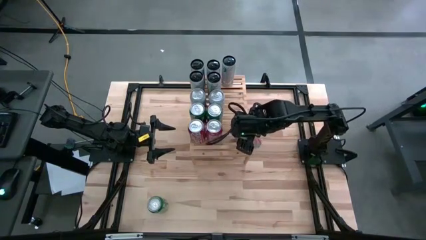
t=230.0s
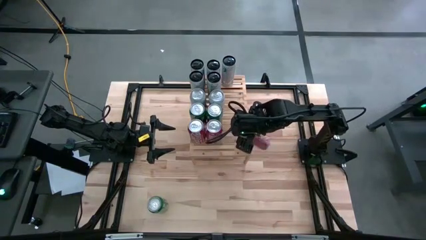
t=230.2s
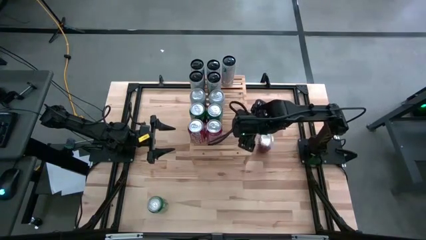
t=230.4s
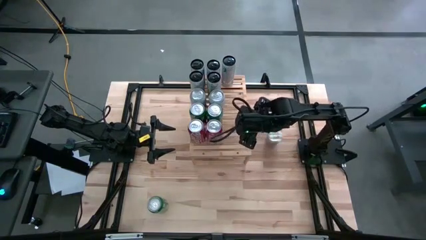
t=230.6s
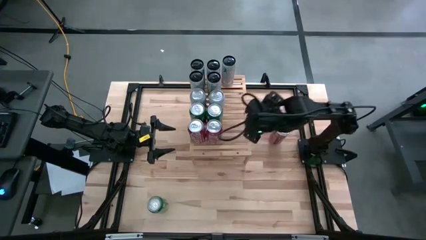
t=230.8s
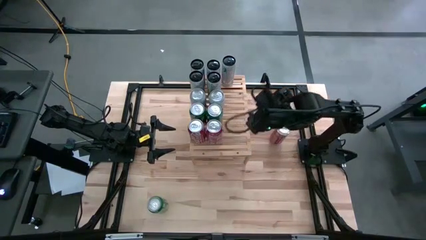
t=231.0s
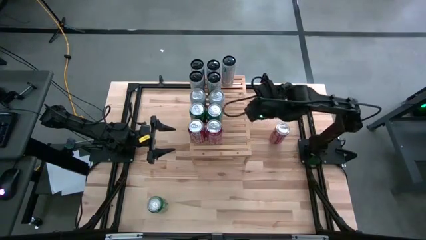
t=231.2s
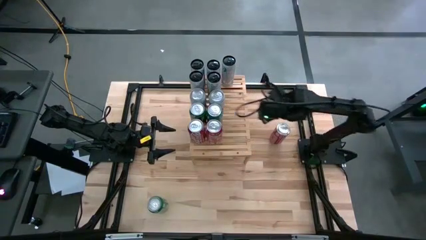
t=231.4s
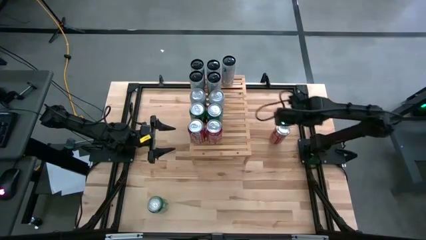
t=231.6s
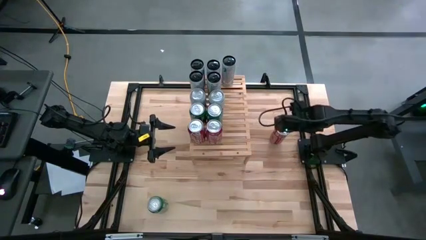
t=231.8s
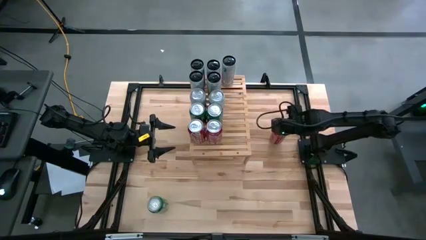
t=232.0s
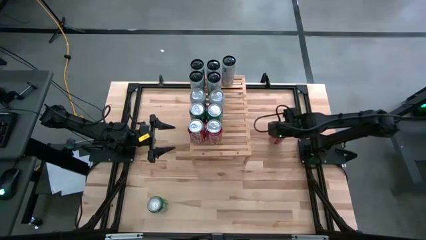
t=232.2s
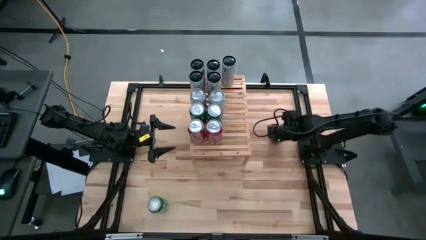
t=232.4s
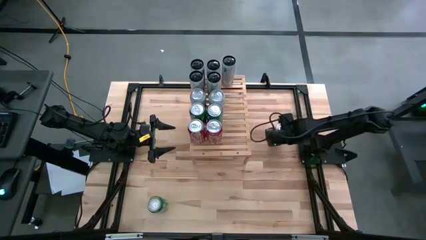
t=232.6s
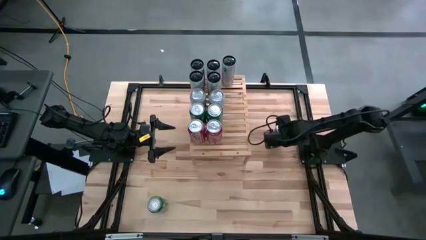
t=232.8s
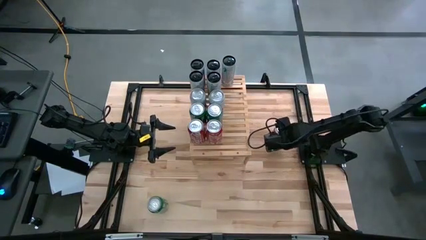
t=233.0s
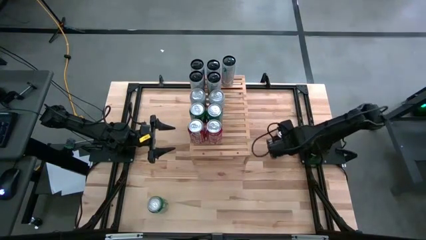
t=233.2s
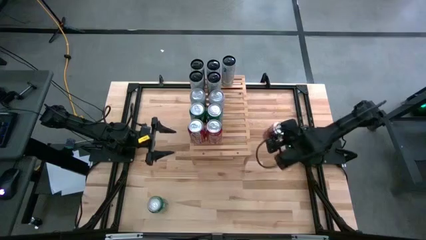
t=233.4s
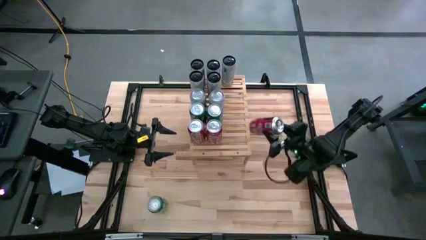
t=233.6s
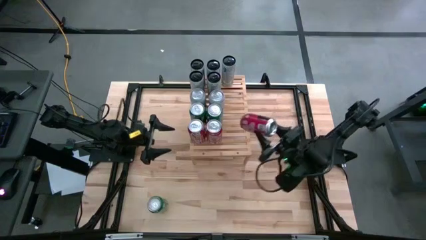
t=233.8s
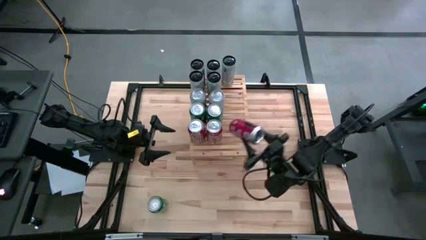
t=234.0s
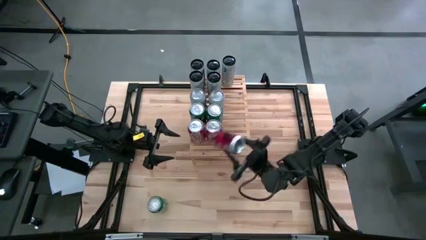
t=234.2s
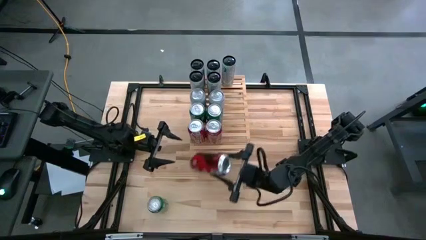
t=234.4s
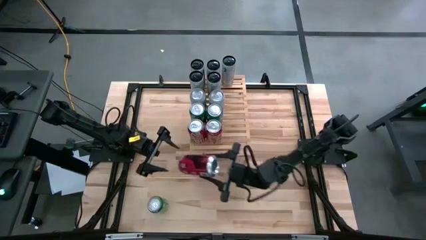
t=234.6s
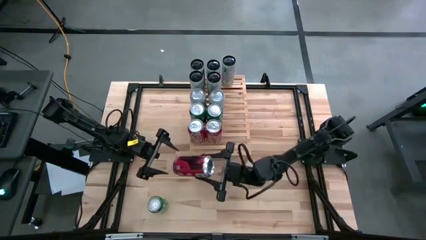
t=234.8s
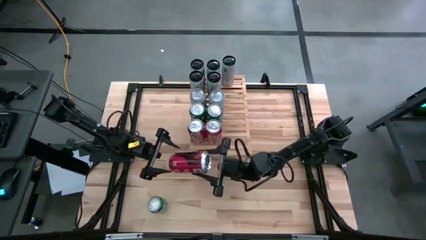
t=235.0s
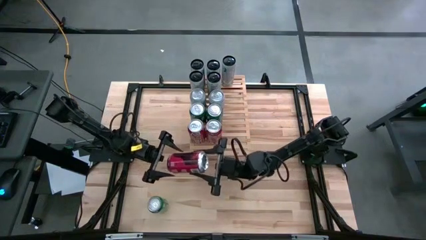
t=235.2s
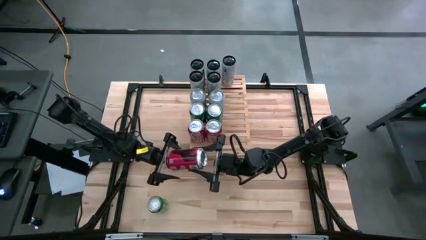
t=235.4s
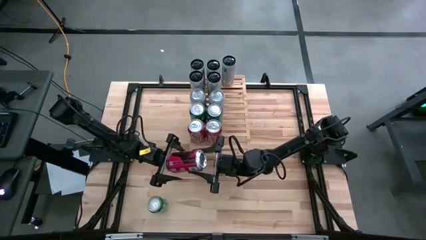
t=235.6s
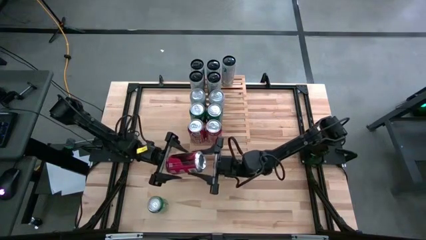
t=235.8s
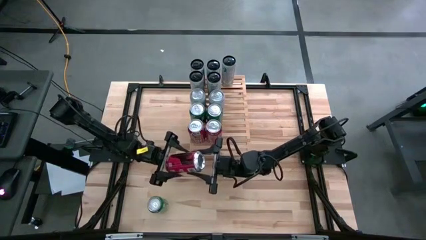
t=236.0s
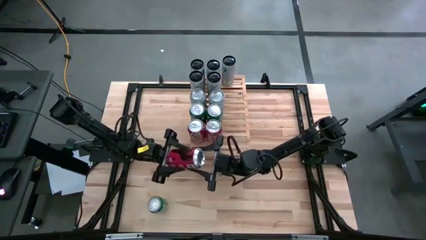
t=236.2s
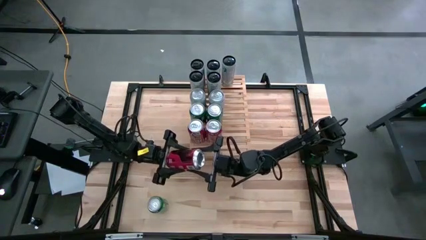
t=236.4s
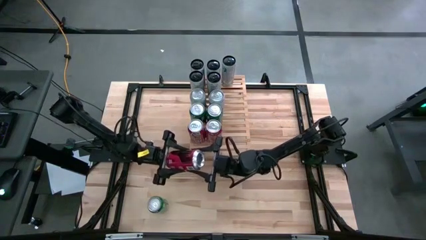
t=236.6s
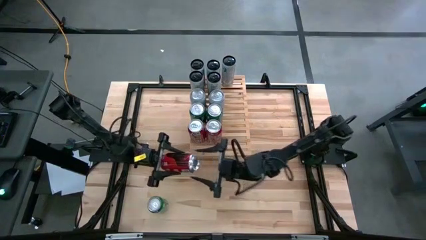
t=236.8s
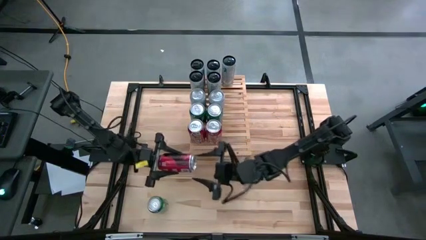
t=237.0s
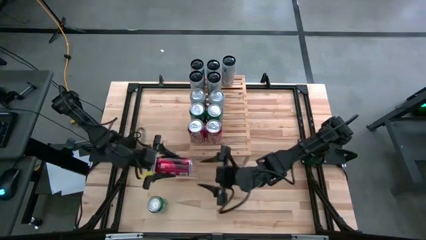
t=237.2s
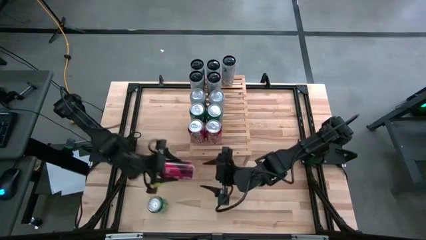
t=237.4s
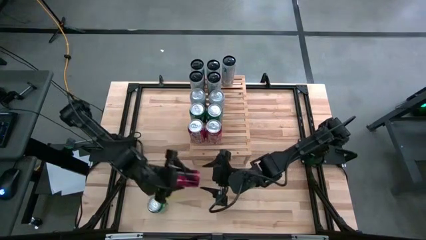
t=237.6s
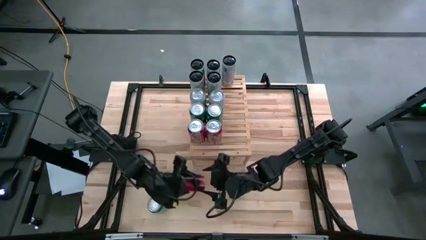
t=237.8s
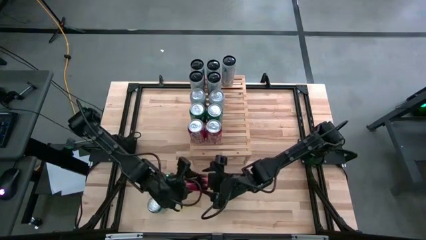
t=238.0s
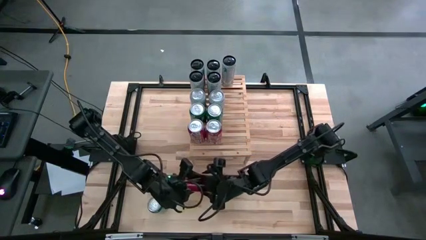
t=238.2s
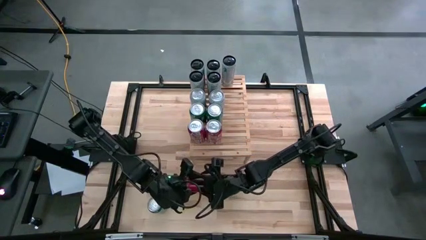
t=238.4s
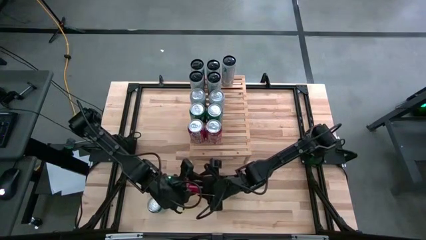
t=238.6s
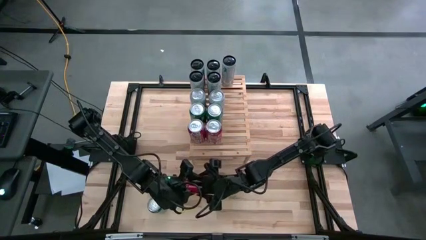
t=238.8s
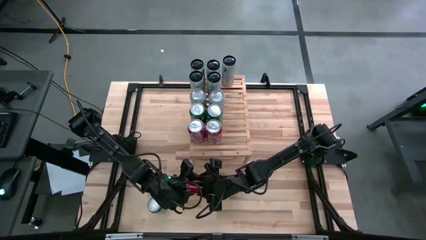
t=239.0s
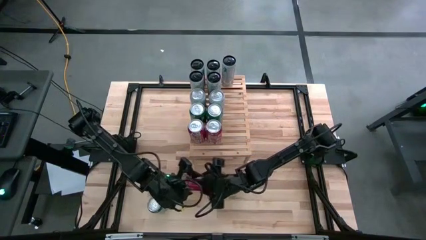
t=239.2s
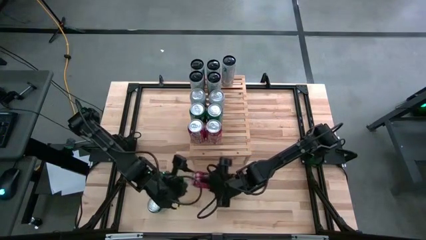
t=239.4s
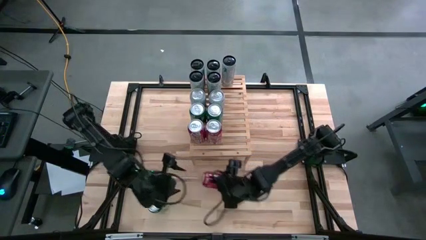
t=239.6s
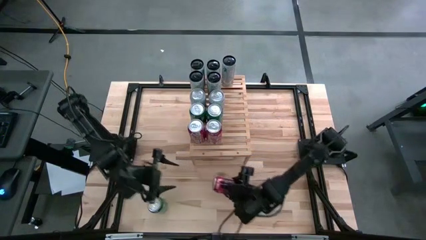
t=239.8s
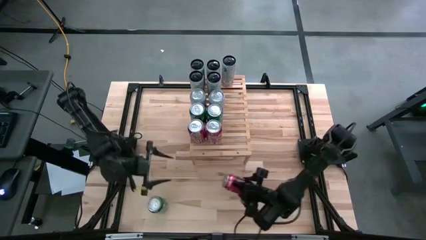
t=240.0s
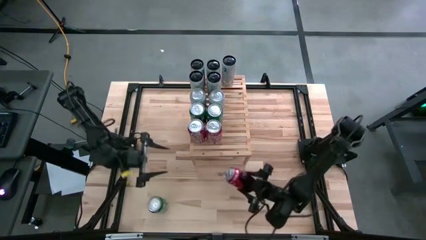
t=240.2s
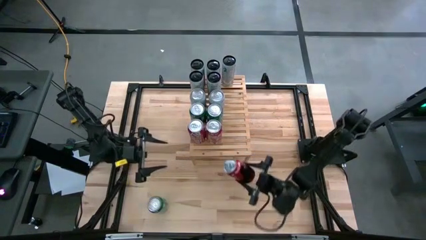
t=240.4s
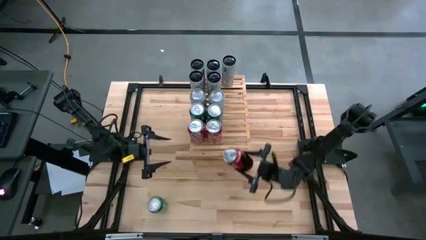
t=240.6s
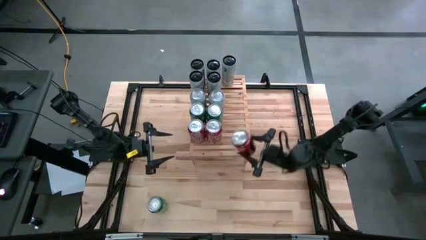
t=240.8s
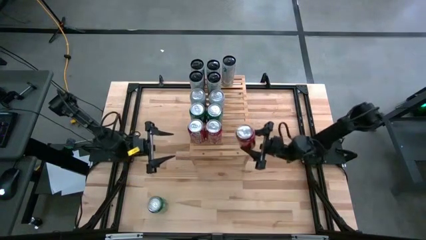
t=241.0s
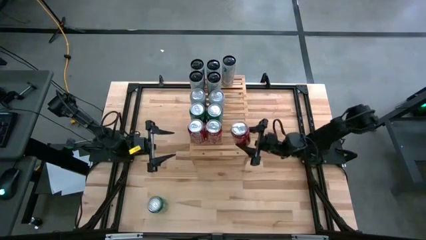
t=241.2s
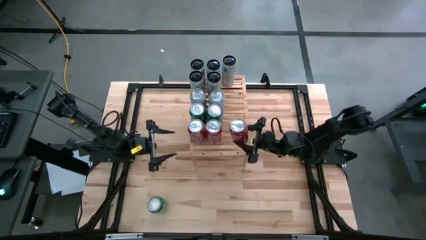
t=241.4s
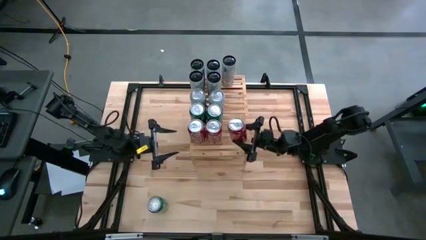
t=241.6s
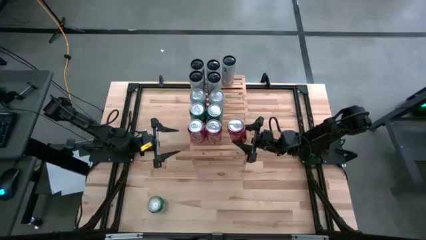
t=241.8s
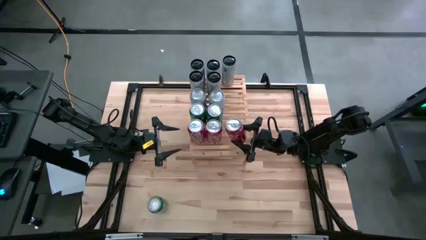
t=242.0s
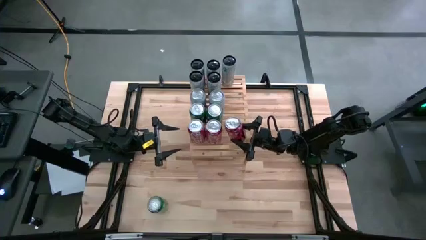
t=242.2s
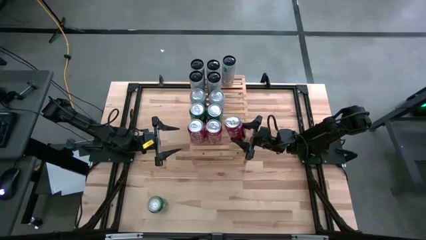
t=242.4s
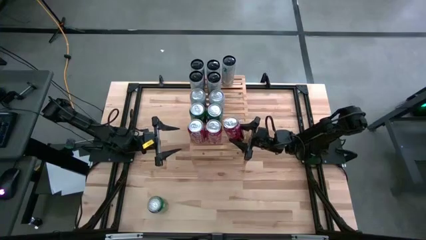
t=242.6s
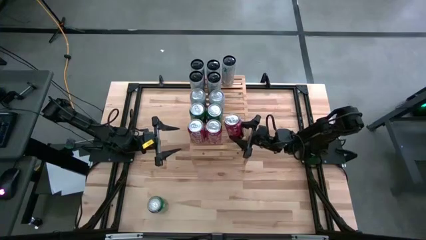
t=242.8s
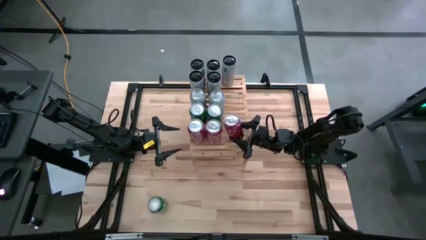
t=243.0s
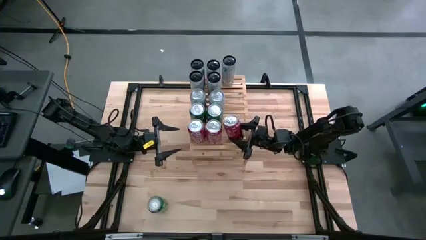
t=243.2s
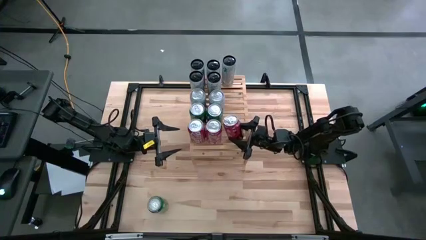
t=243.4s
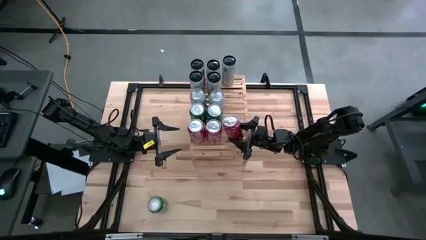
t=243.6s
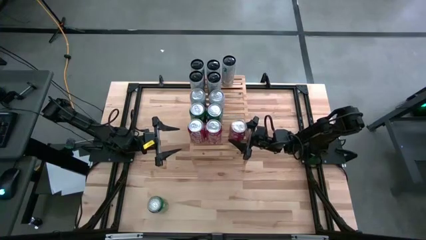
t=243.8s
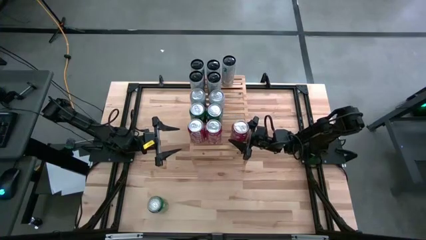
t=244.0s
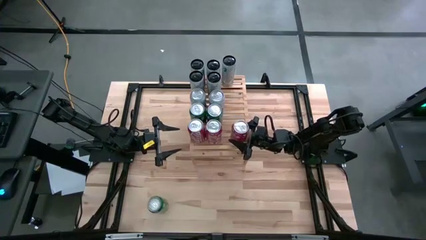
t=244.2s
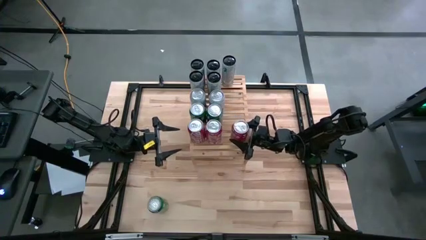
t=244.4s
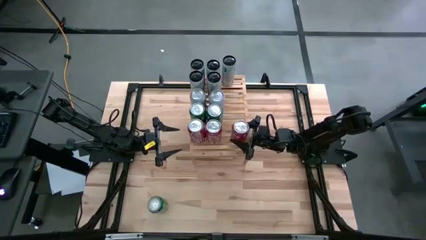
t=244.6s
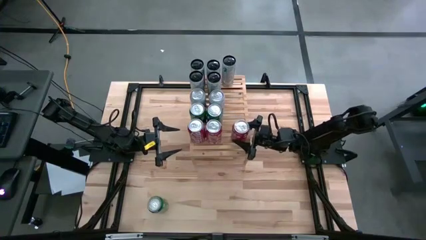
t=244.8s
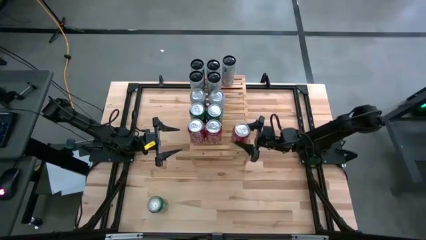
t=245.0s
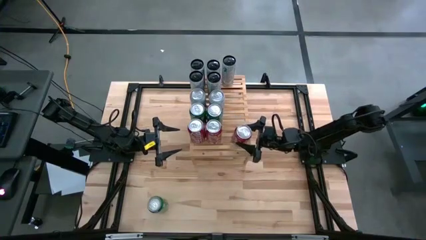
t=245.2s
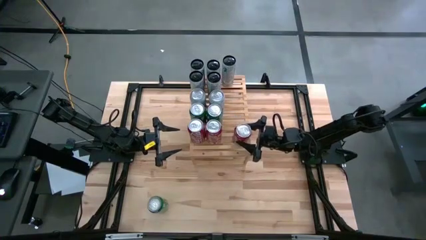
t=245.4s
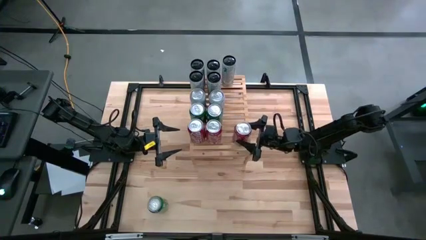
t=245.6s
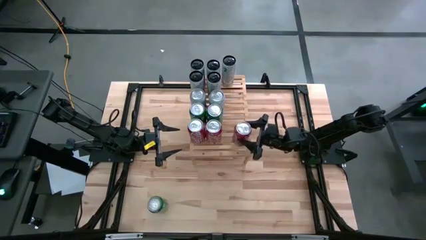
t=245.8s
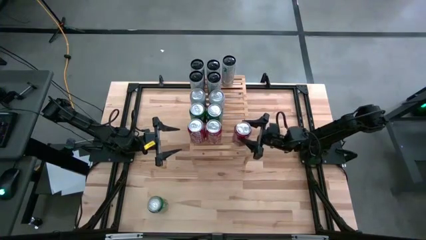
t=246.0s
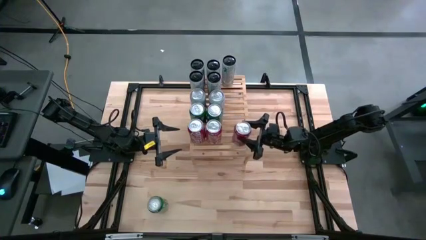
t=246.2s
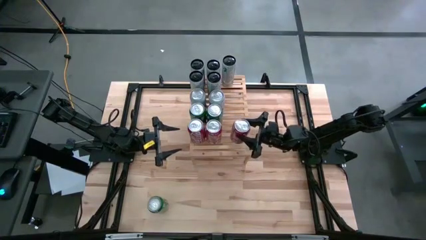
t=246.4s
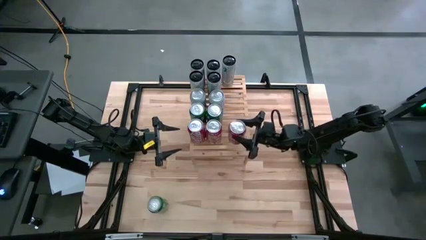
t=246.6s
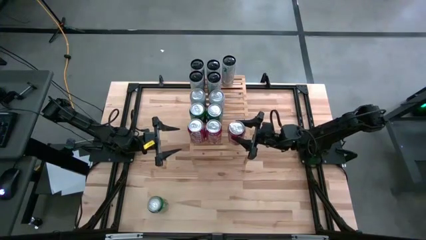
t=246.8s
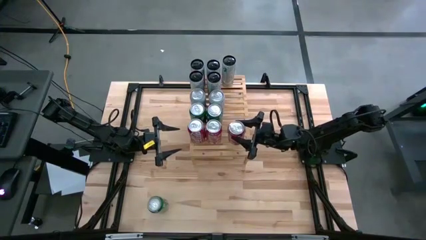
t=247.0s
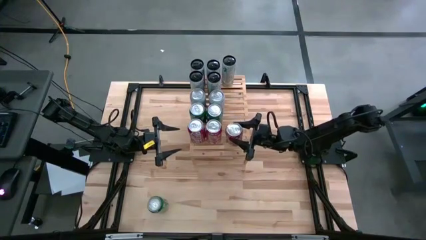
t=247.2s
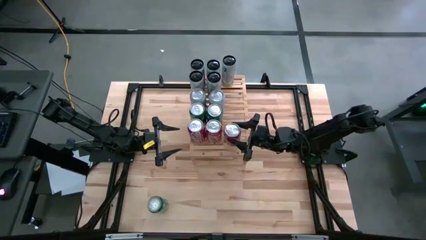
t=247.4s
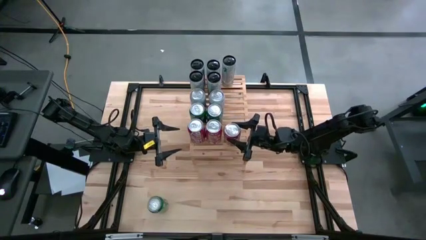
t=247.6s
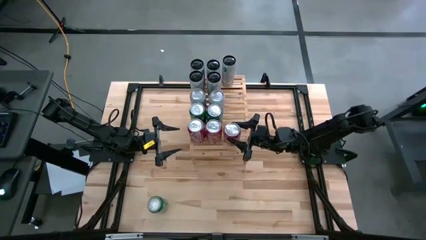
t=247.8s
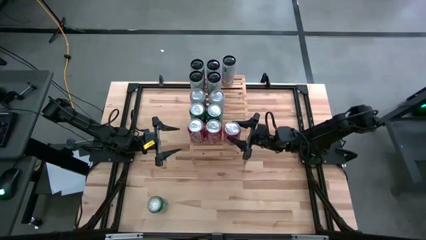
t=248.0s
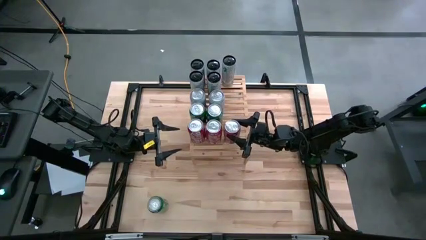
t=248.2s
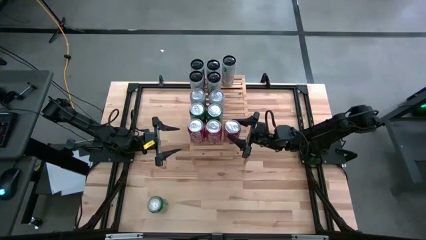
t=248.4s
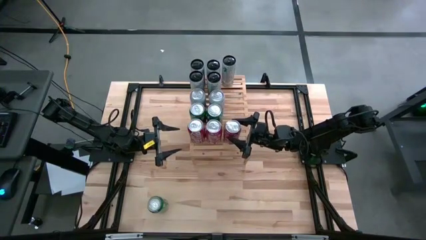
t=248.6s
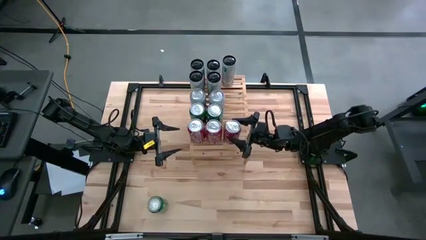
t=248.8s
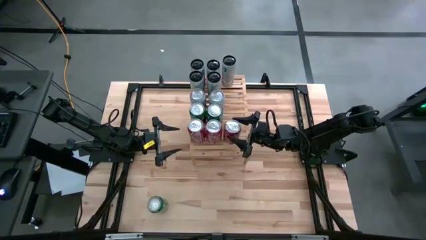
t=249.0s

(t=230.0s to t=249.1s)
Task: Place canned beverage on shelf
Put the red soda can aligned with the other red soda cans on the shelf
